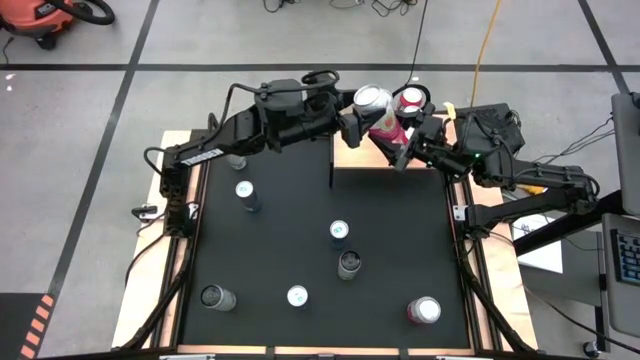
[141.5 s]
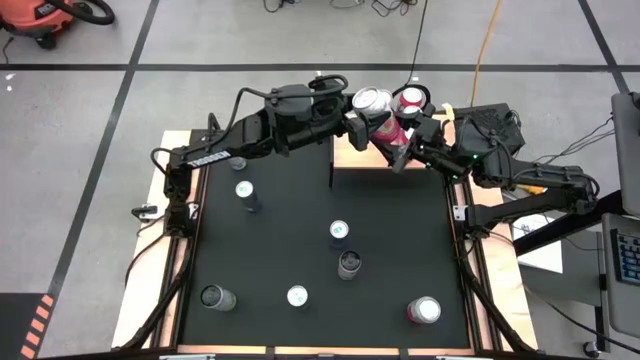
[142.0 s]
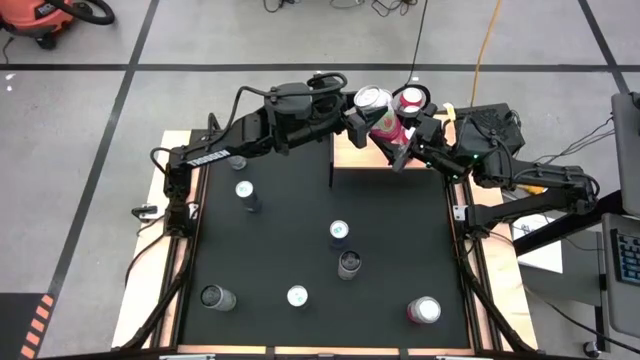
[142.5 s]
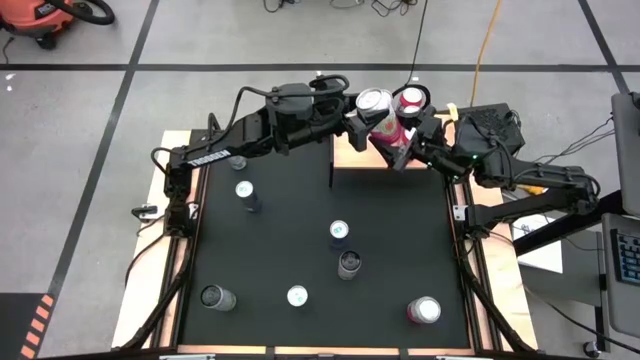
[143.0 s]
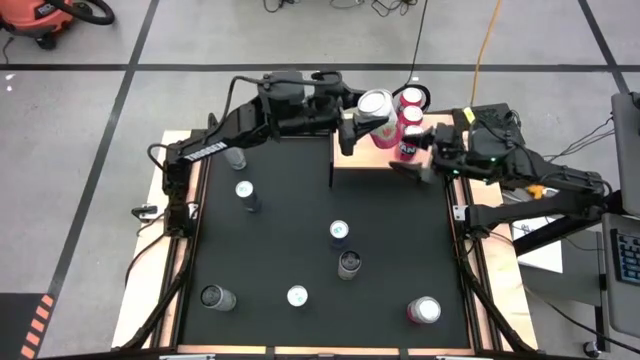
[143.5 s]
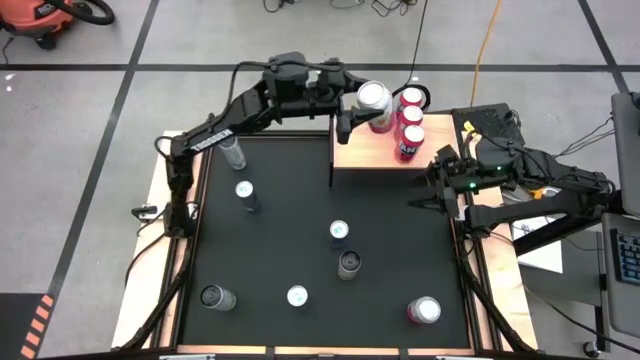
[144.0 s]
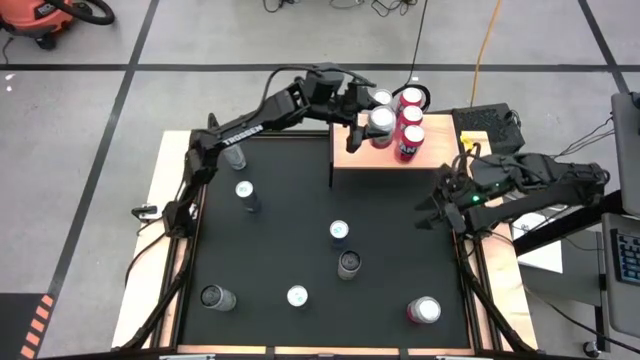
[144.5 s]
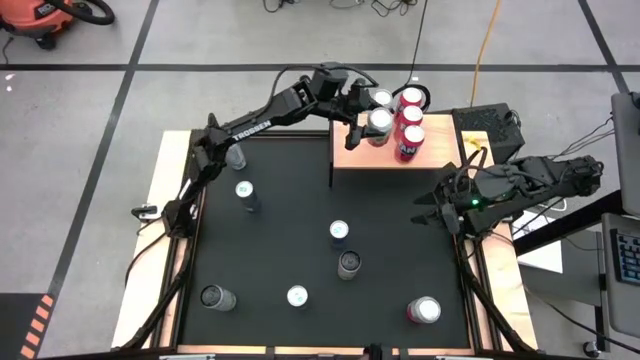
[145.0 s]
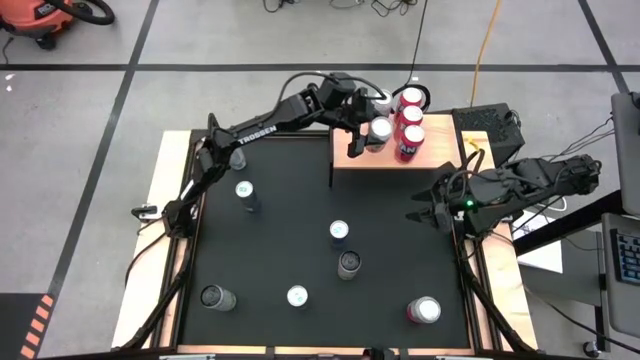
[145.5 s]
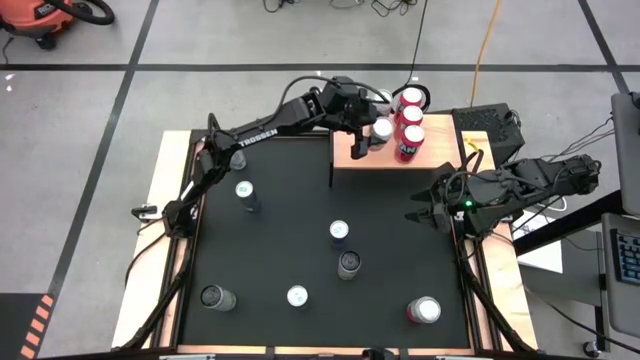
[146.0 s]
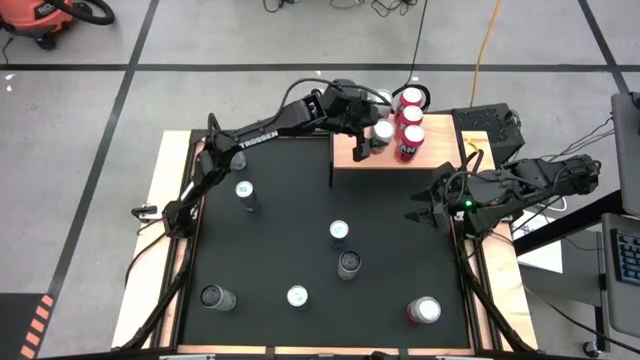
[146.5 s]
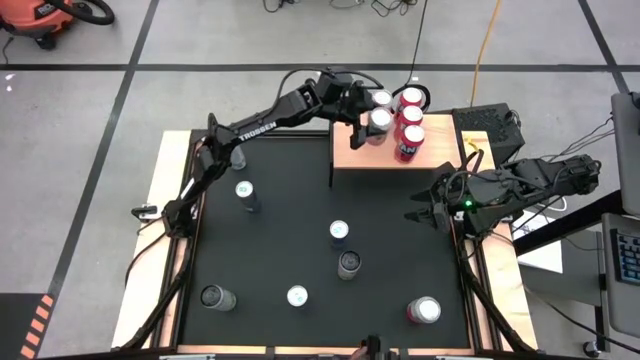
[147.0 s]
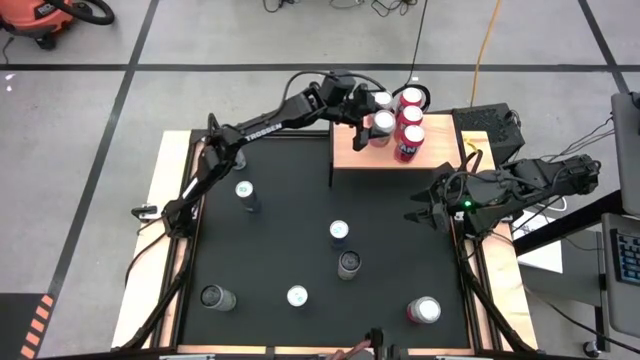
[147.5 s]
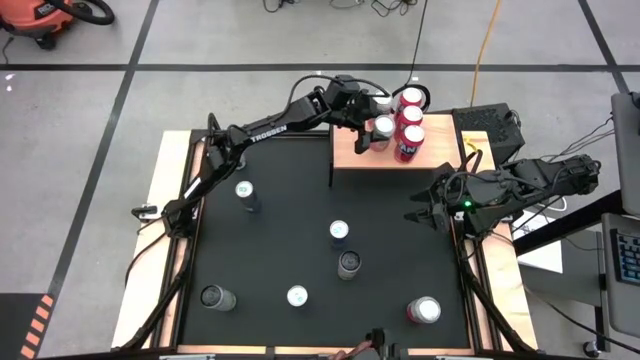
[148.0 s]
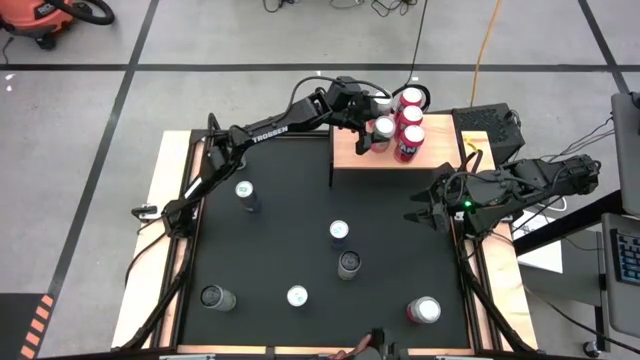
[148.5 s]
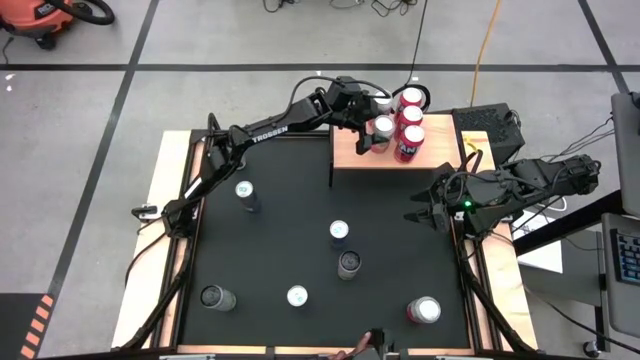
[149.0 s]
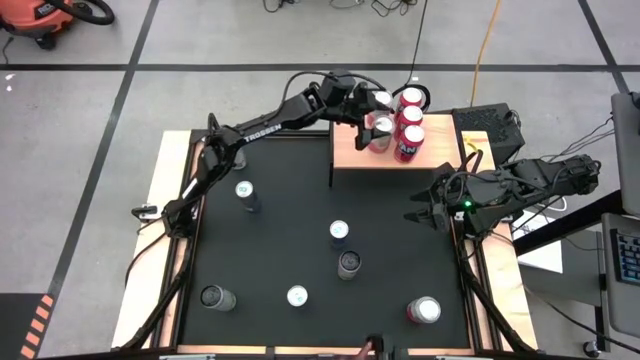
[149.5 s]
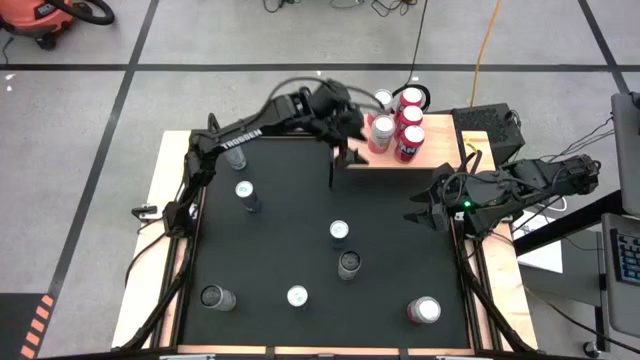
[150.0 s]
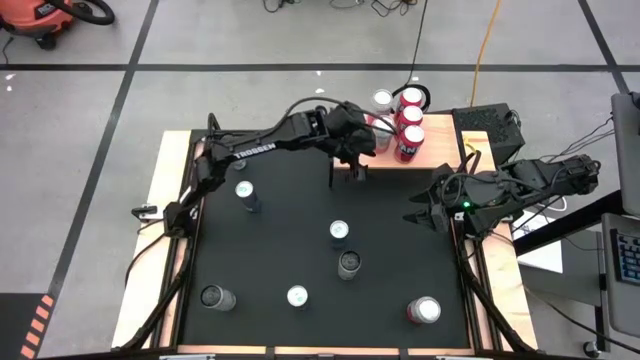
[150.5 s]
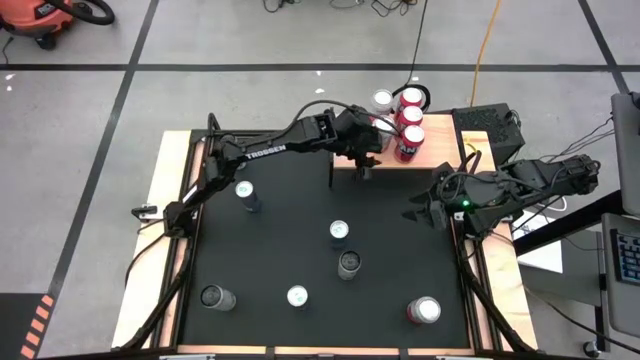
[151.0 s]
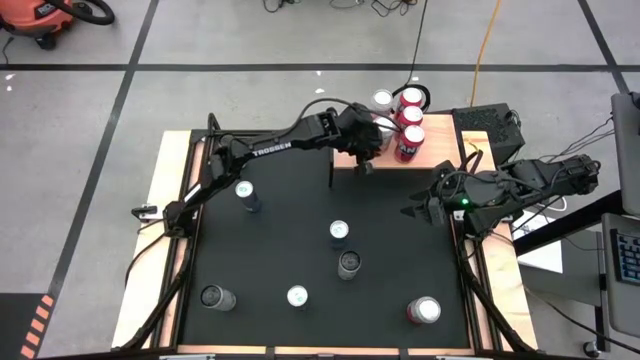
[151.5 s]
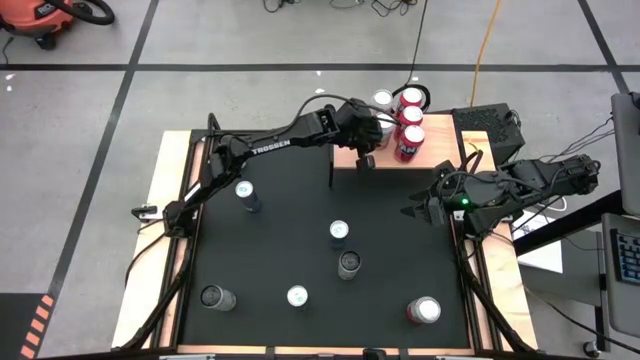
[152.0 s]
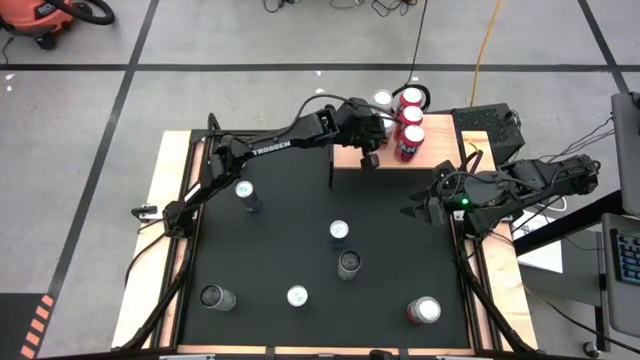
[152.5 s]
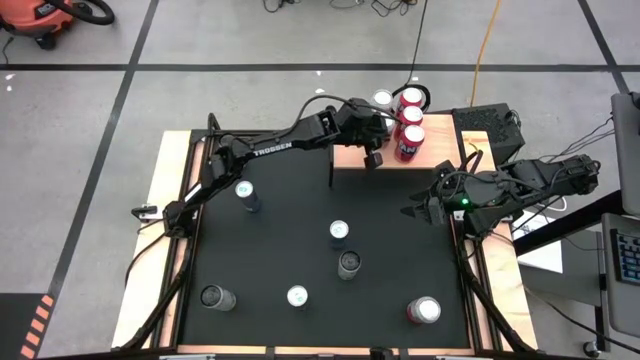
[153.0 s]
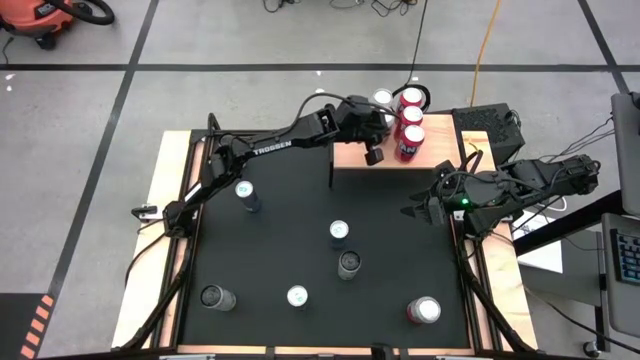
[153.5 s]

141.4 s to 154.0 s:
Task: Place canned beverage on shelf
Put the top pink white soda can on the shelf aligned with the other pink white soda can

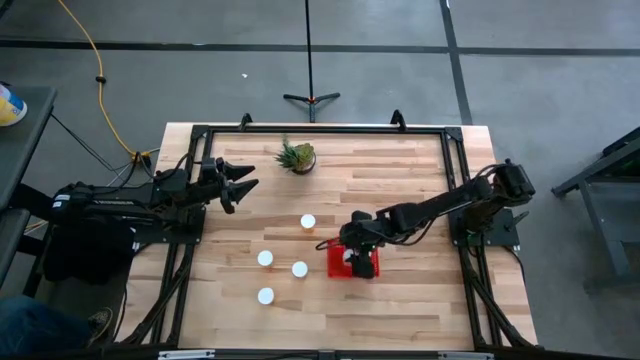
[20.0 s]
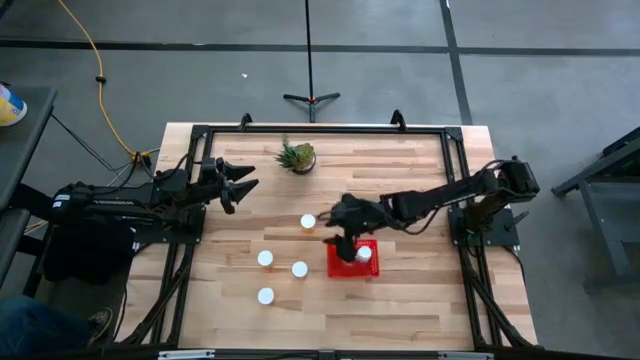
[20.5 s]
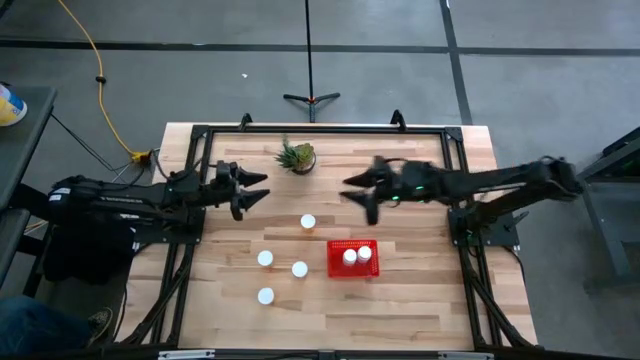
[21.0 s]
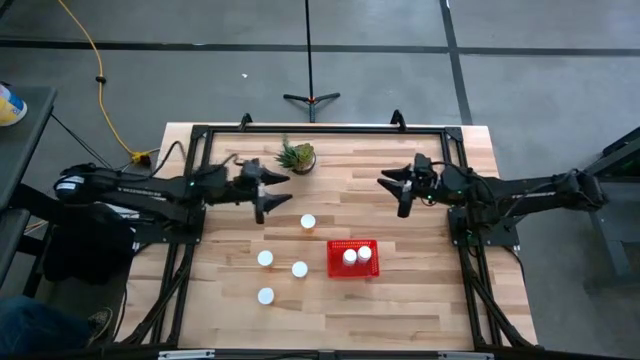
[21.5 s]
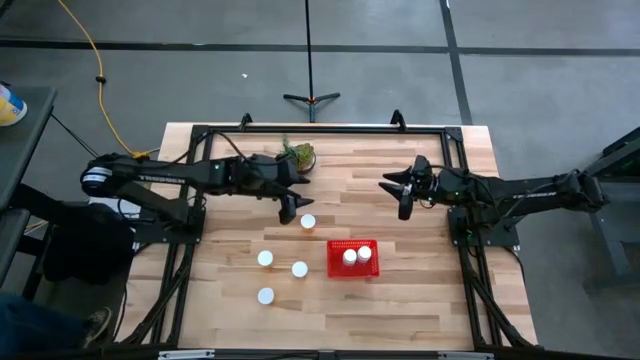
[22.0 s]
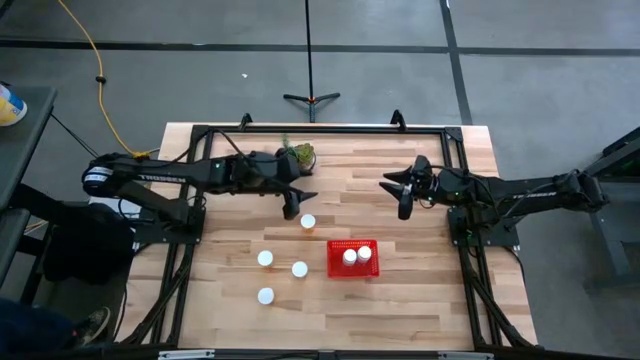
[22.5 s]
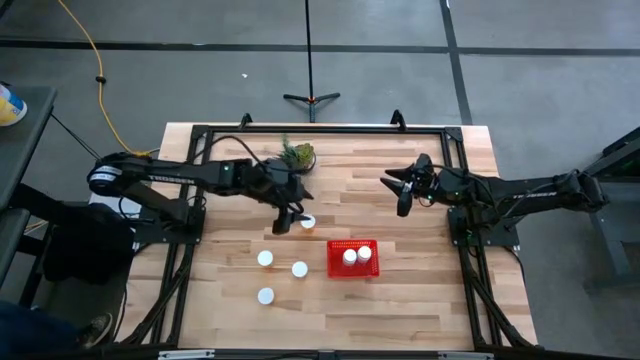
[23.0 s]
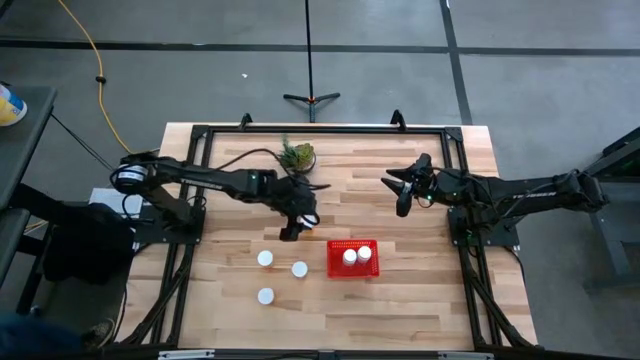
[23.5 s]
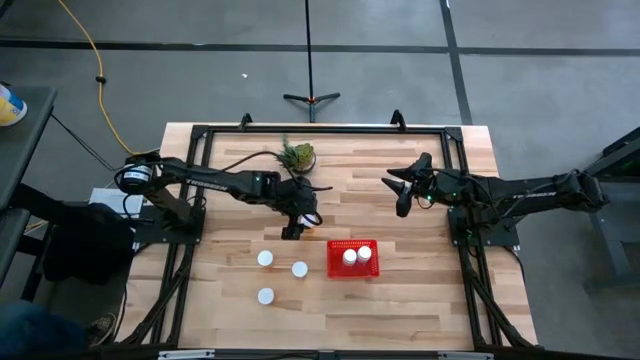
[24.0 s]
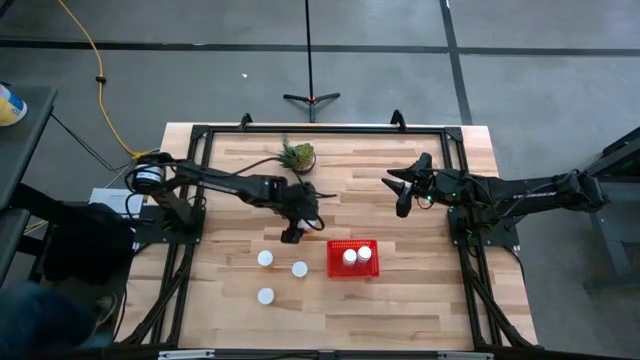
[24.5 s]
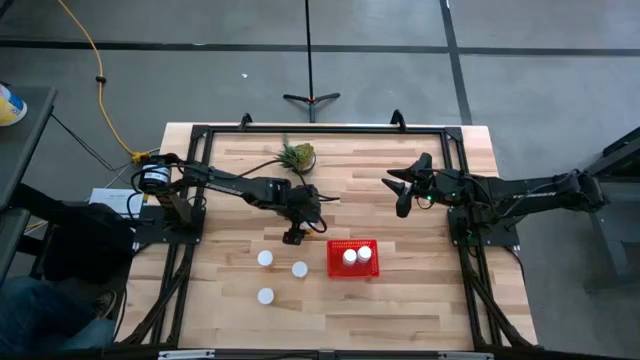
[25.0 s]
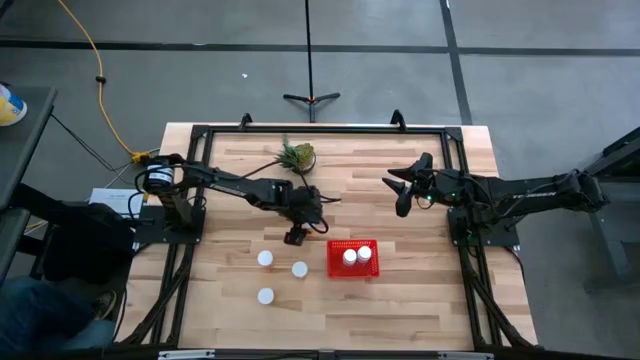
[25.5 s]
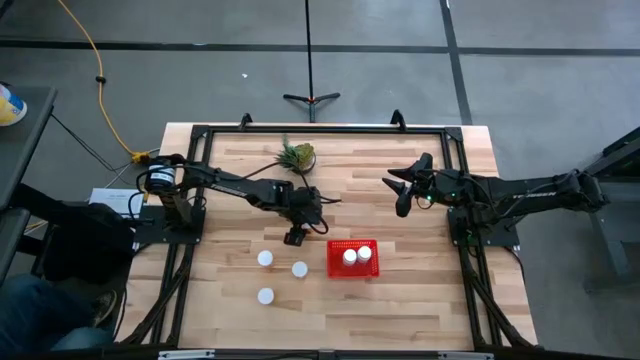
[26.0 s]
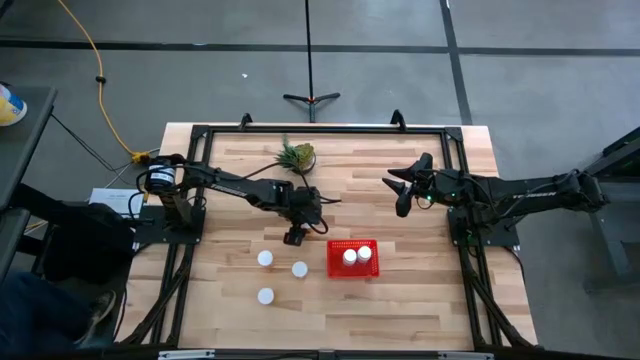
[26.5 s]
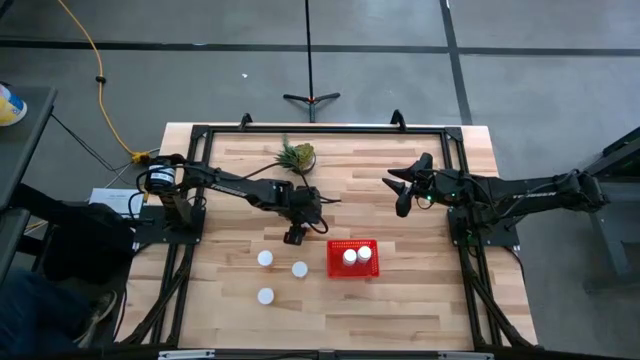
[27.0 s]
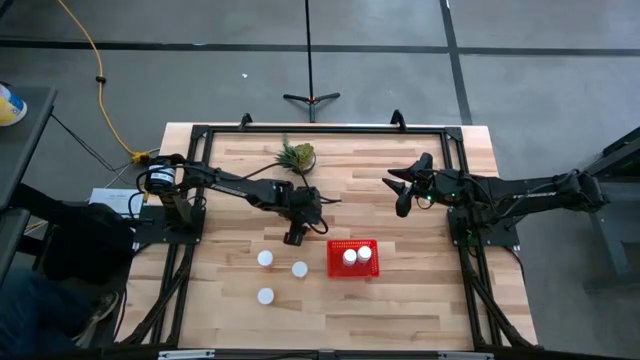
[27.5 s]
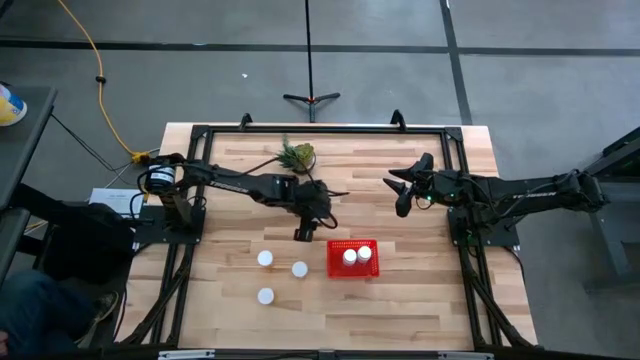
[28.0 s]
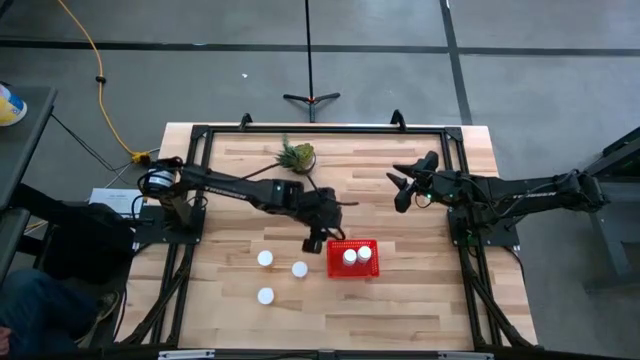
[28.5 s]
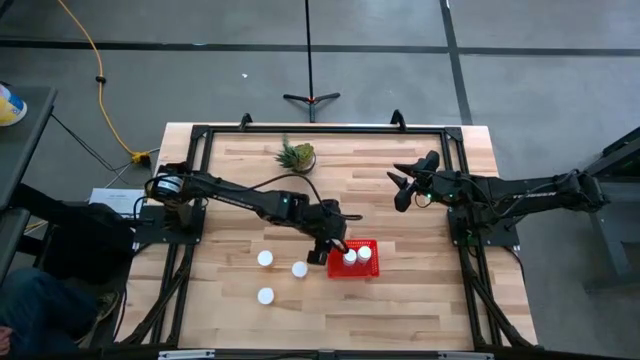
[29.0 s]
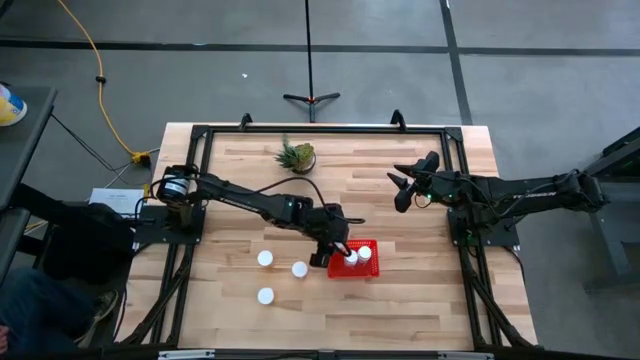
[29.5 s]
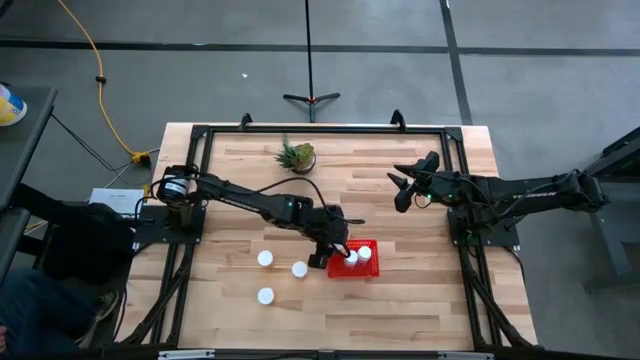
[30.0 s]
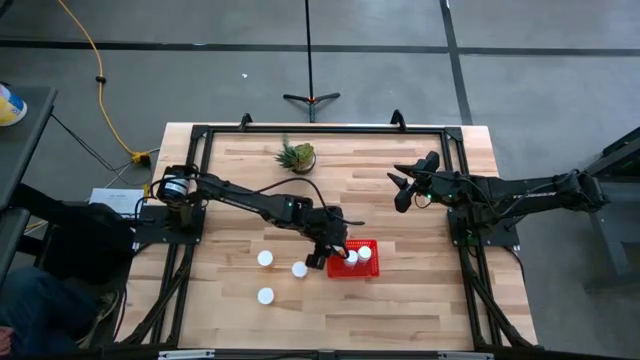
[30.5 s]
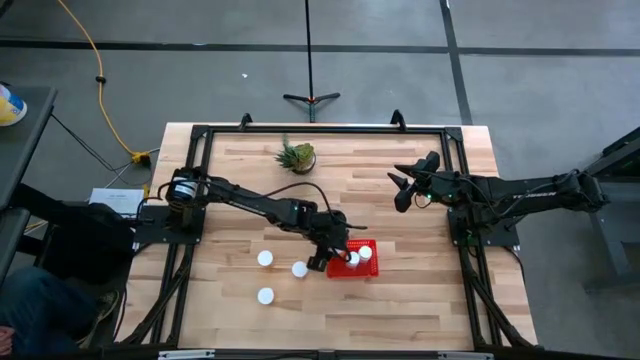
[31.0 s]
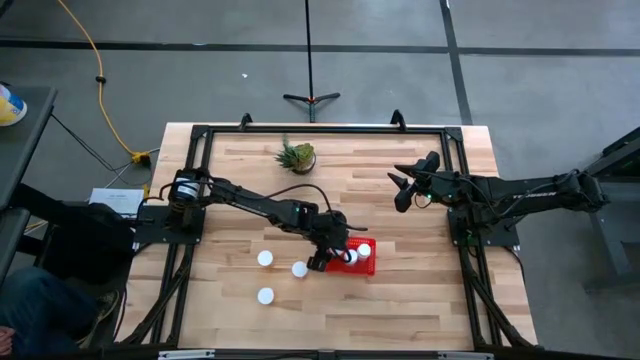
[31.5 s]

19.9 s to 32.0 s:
Task: Pick and place pill bottles into a basket
Put the orange pill bottle into the red bin
